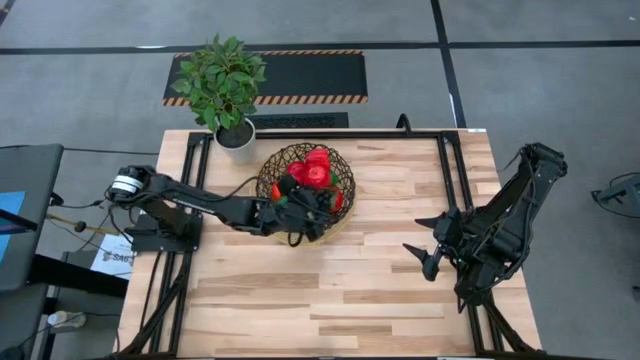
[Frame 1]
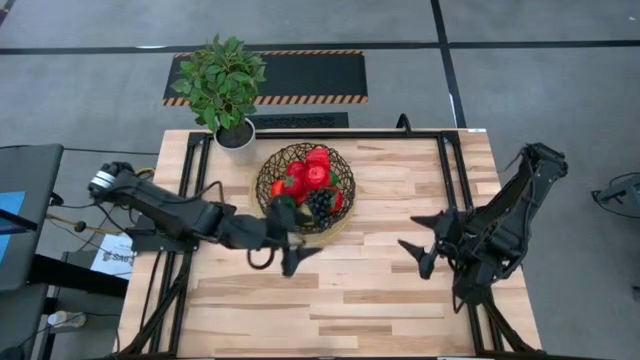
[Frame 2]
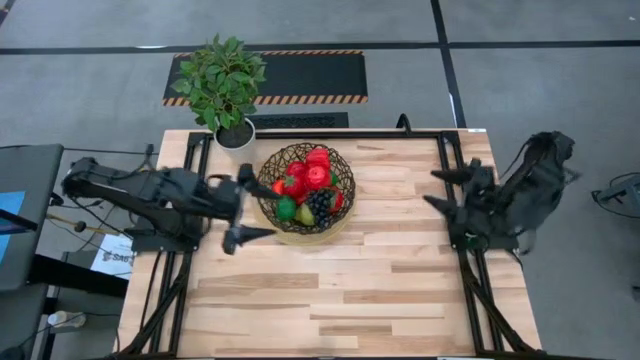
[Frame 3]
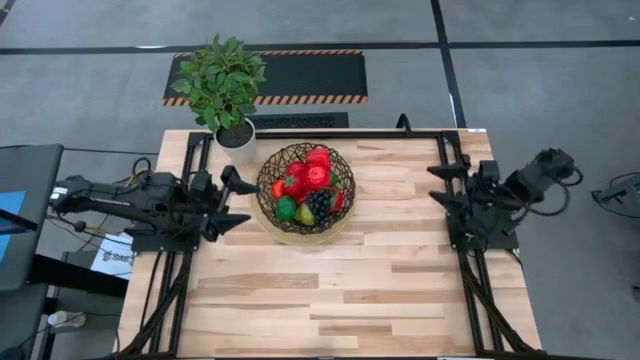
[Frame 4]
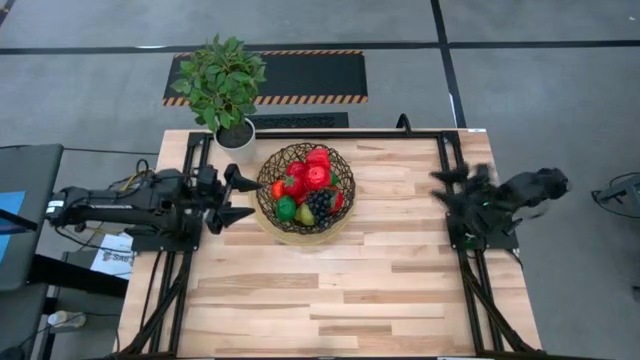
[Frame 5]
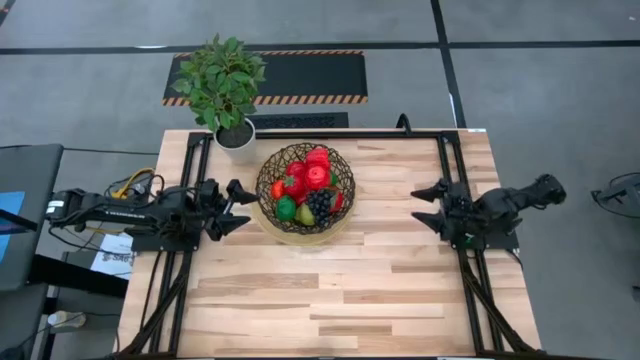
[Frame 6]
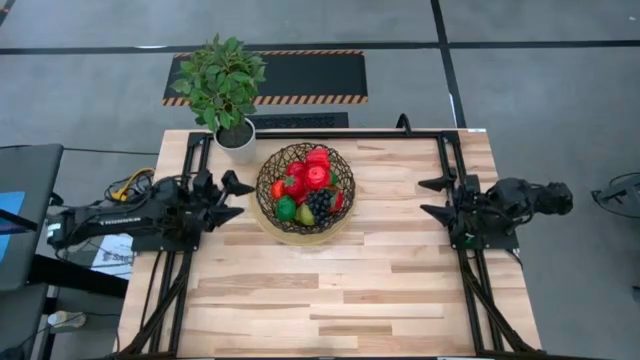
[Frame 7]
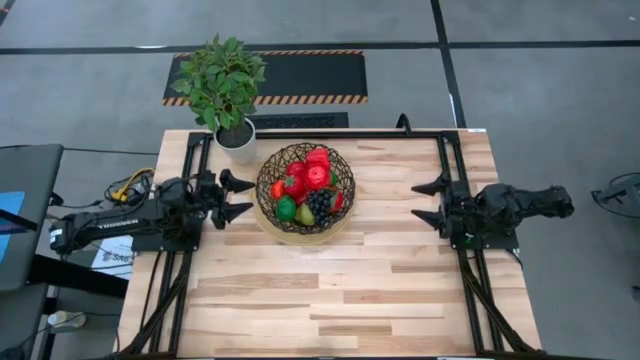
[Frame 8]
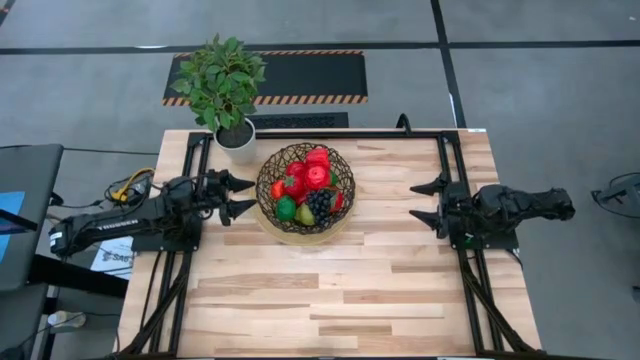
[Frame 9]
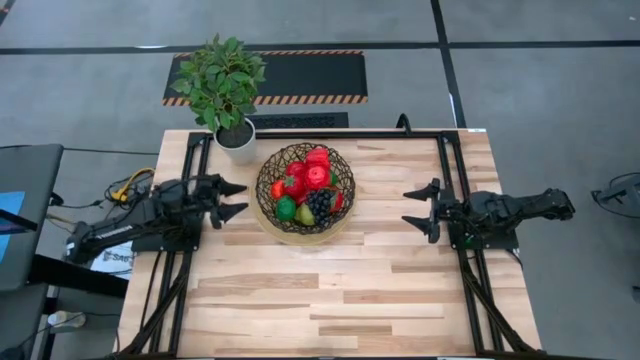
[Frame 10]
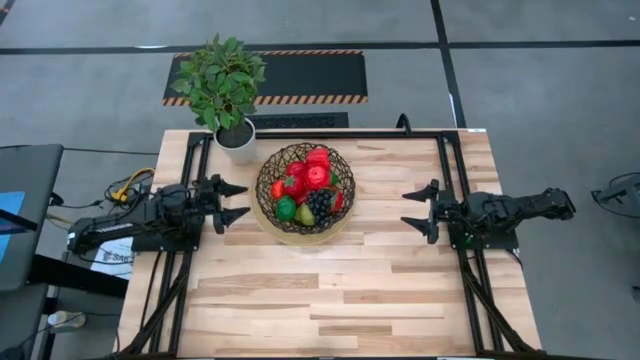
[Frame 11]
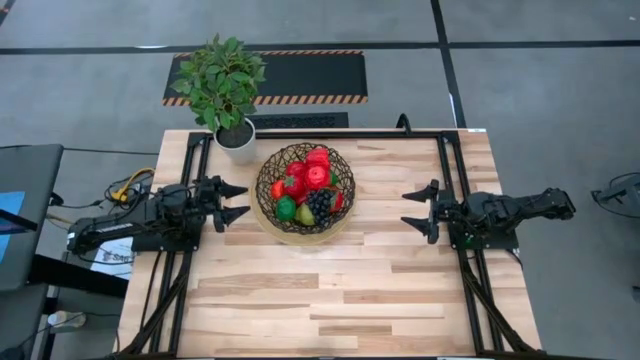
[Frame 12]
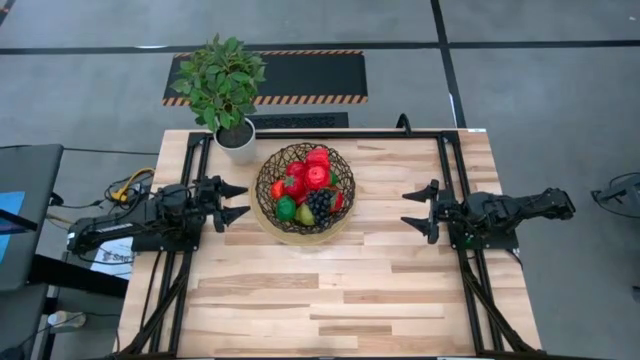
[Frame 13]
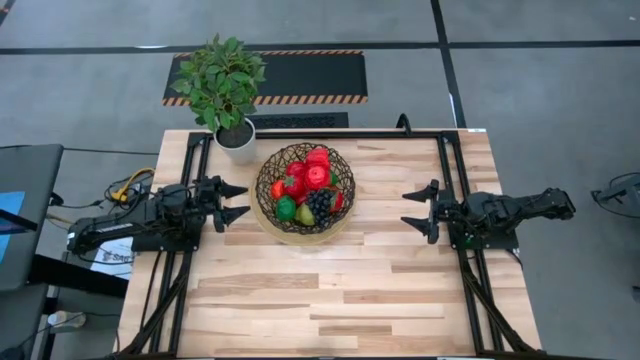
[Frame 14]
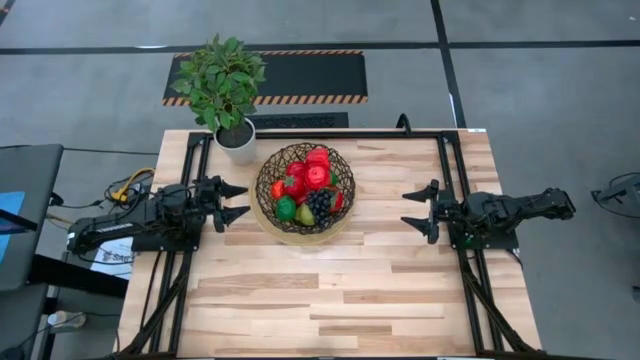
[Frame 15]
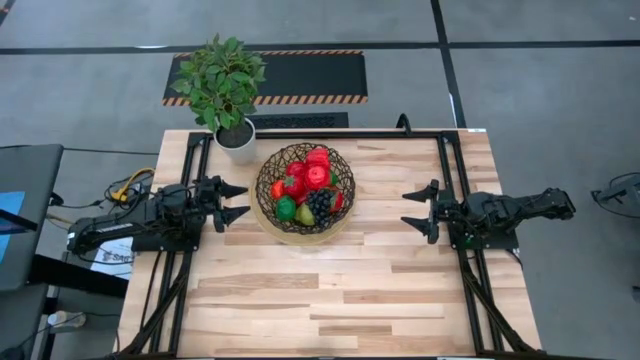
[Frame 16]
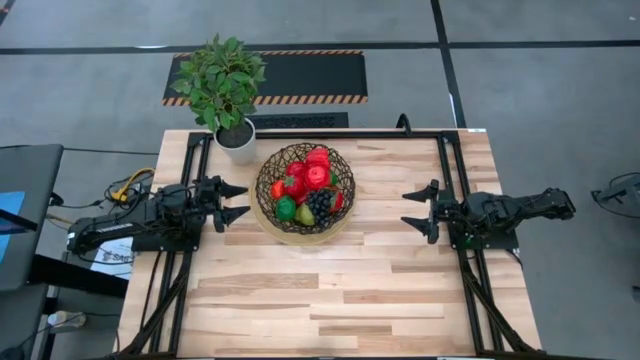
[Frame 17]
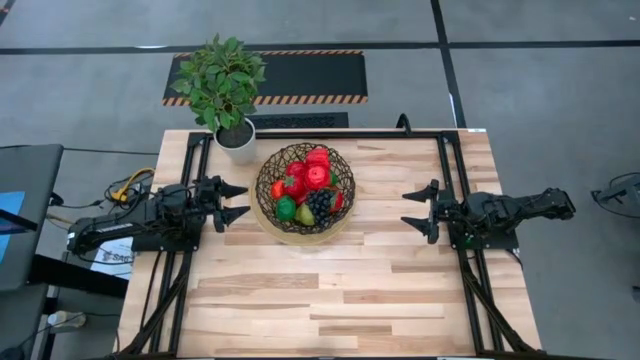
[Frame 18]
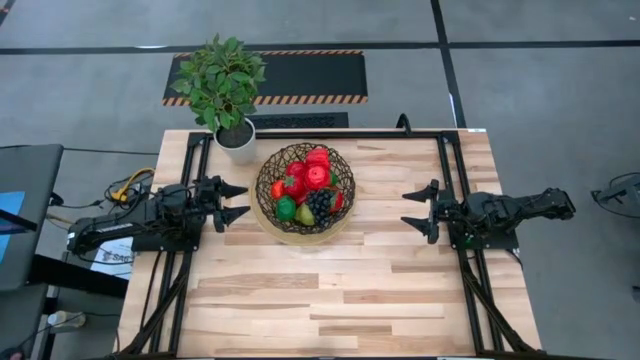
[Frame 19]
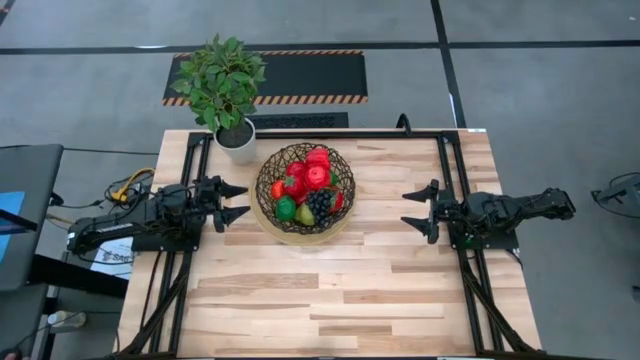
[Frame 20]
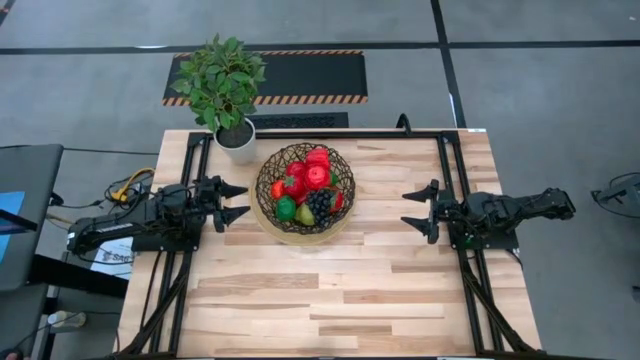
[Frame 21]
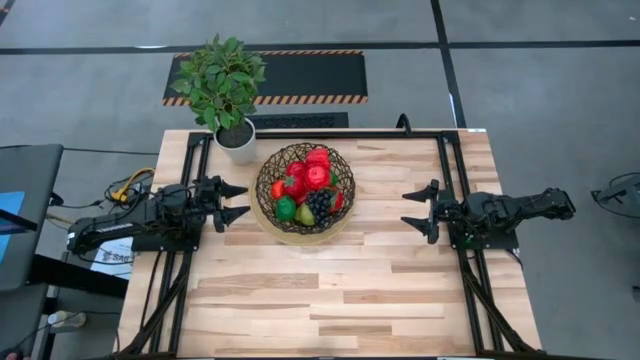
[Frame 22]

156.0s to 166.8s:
Task: Build produce basket
Return to Home Position

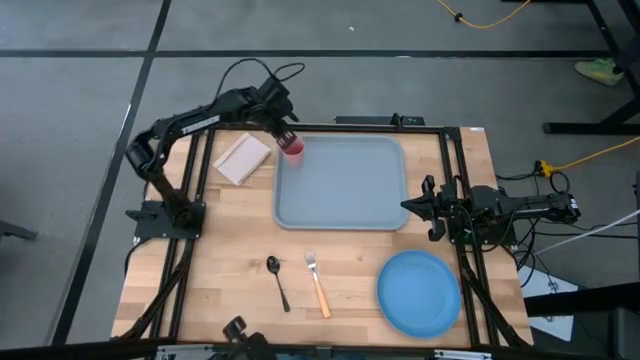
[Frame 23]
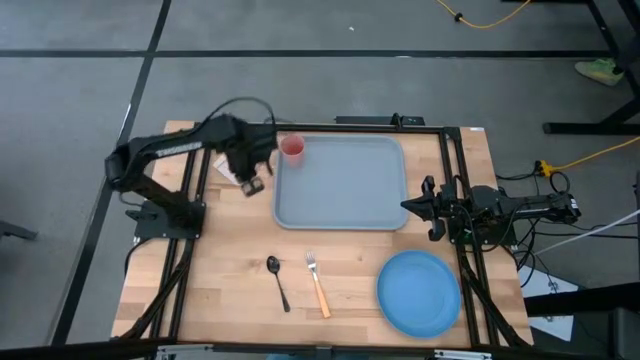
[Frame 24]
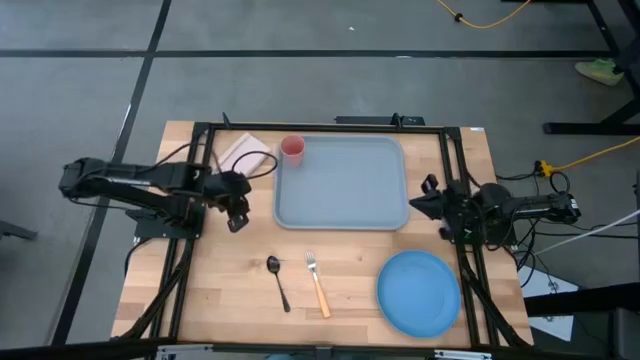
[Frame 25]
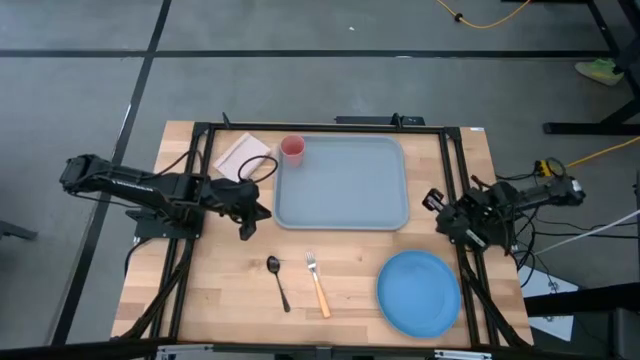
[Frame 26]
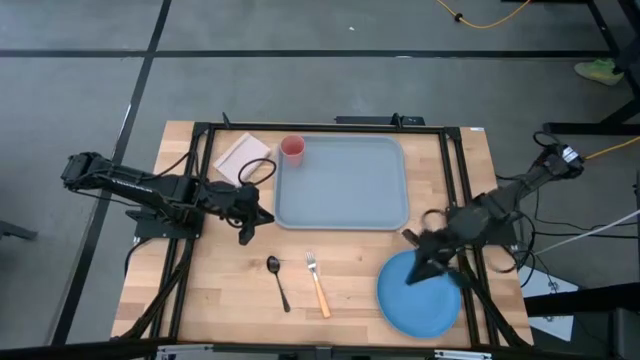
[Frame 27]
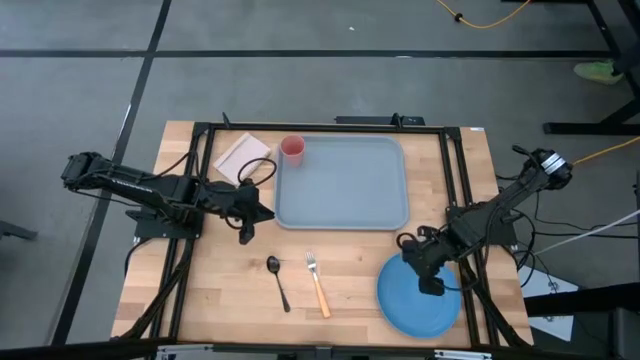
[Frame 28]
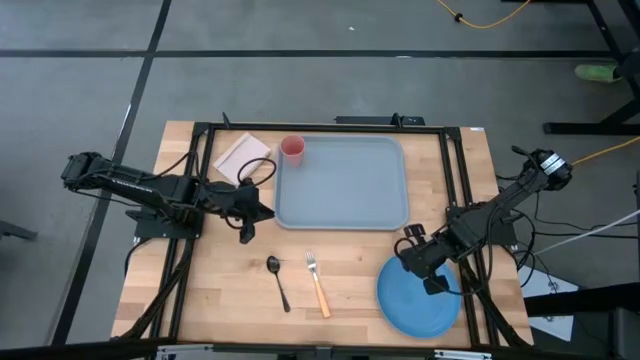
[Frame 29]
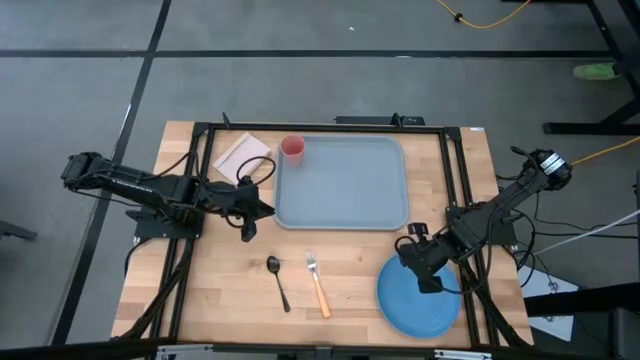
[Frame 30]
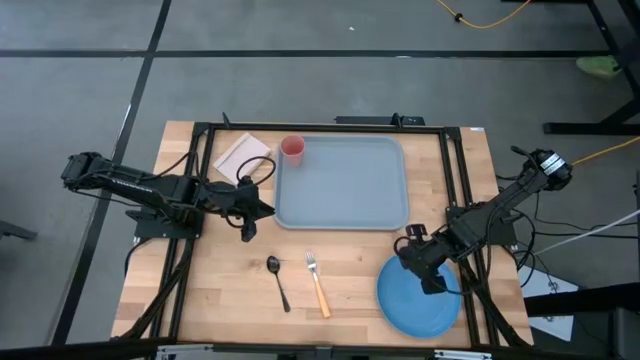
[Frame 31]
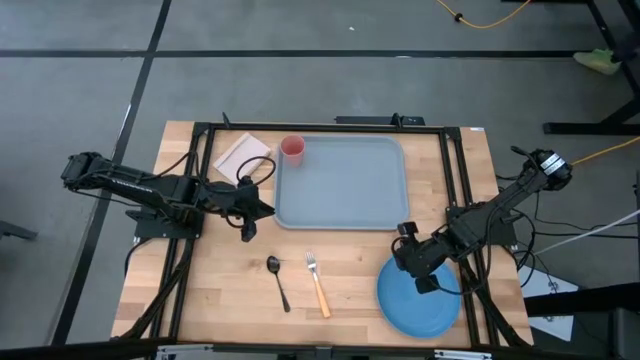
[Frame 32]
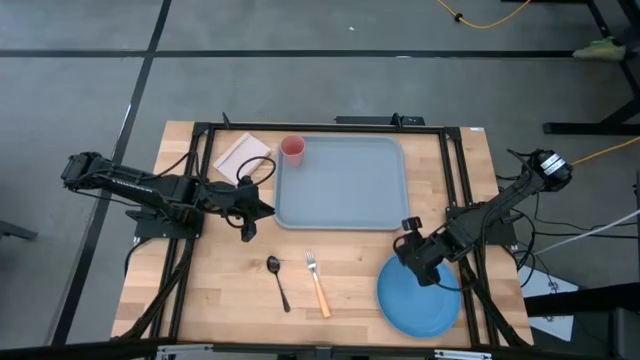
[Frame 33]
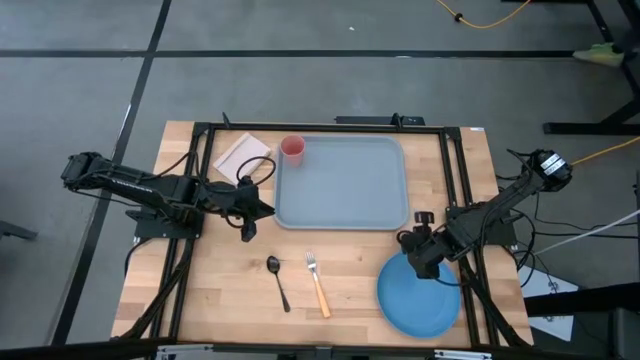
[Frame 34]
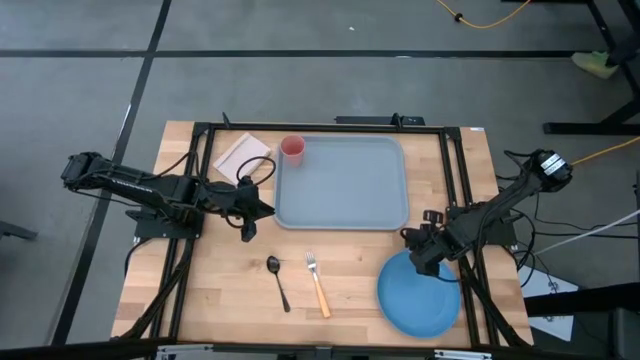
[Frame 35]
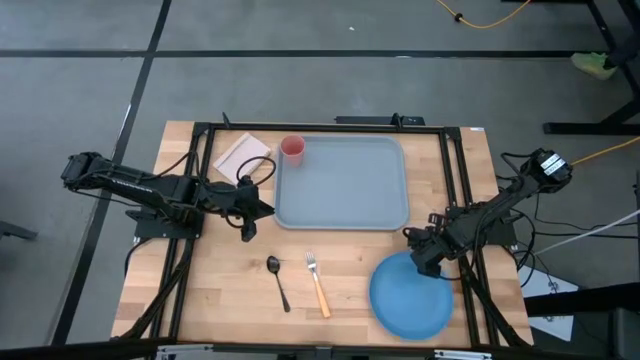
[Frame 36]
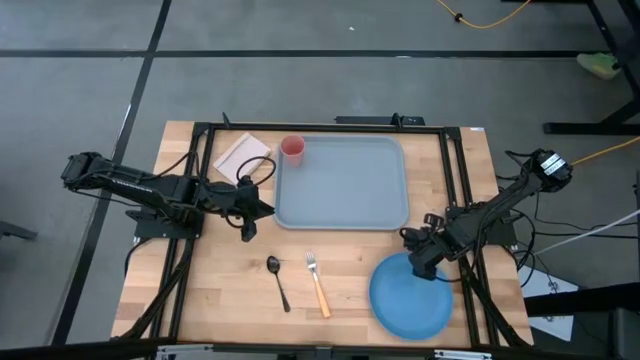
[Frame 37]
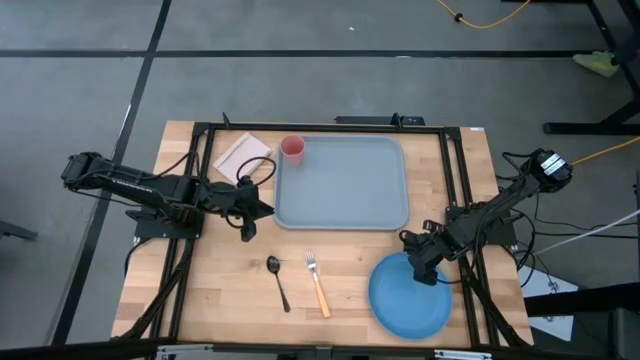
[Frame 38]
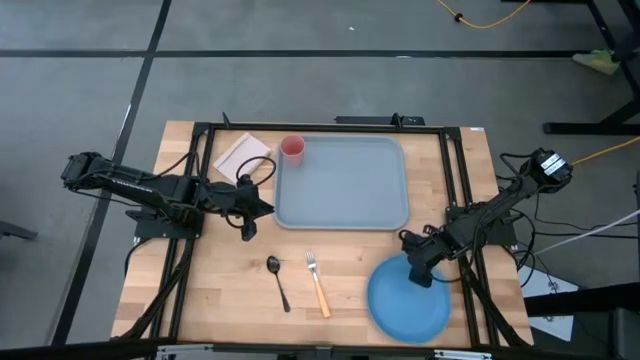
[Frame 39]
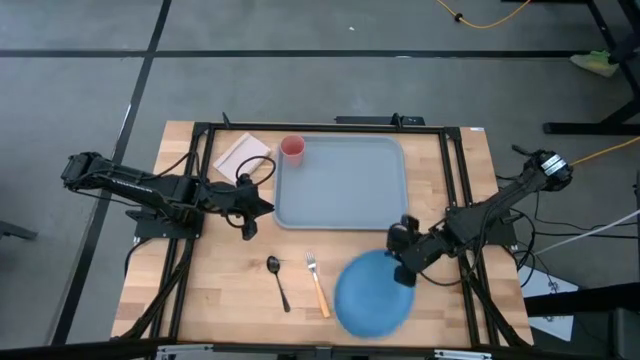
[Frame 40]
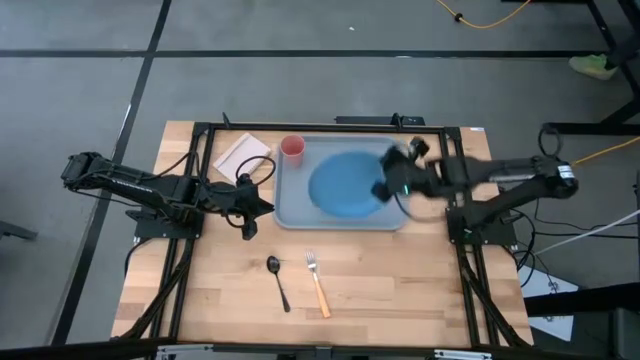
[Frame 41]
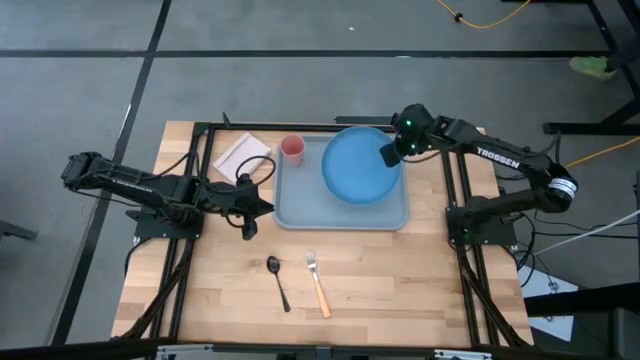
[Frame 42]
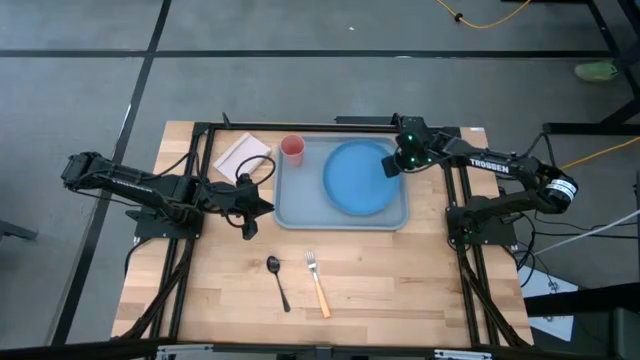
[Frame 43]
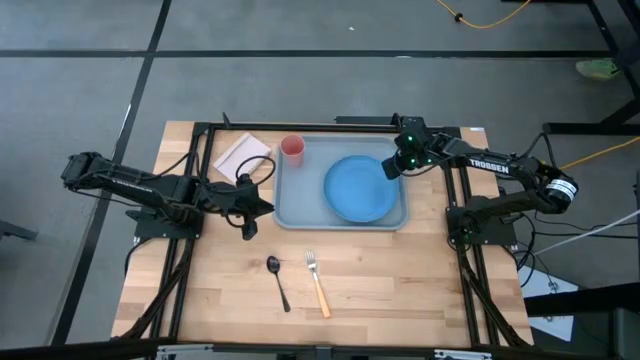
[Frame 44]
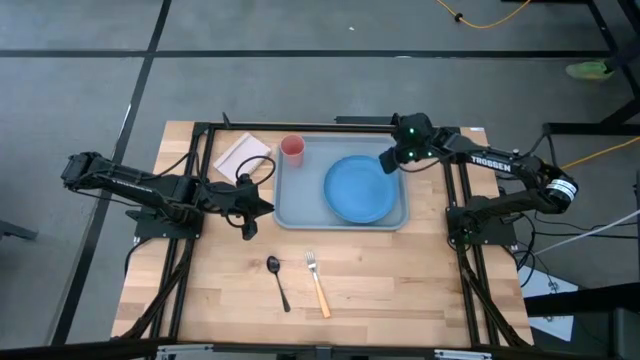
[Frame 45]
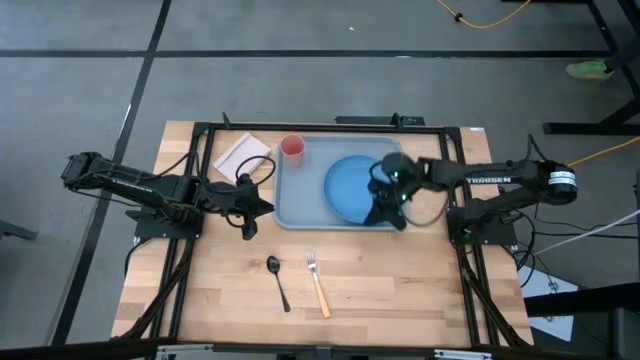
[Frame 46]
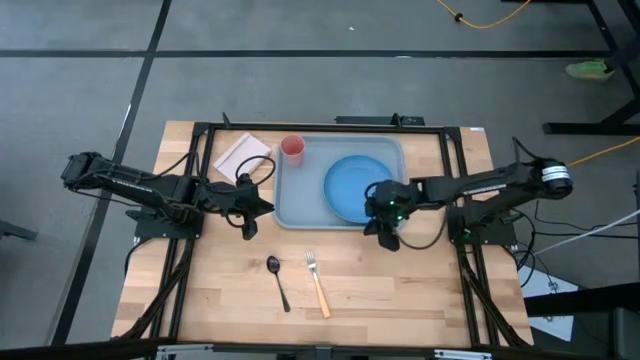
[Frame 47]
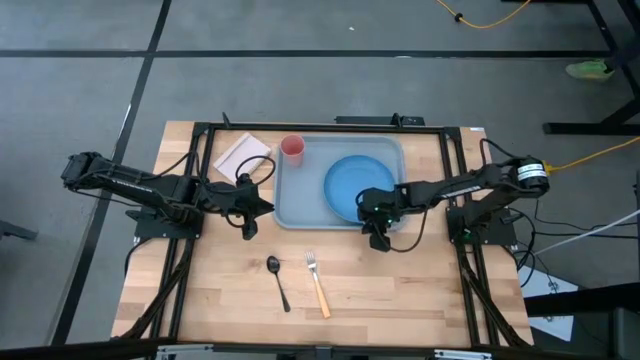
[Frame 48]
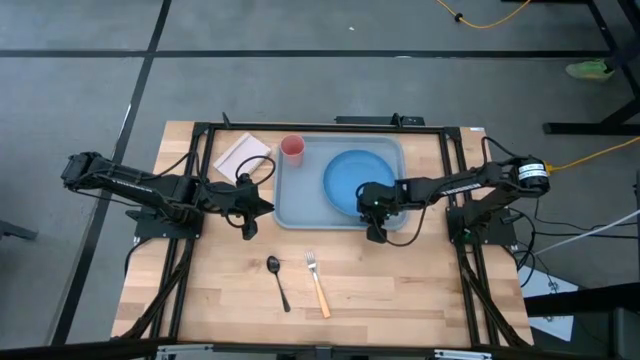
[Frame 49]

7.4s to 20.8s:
Task: Pick and place plate/cup/fork/spoon on tray
Put the blue plate on the gray serving tray to the bottom right of the pink cup
